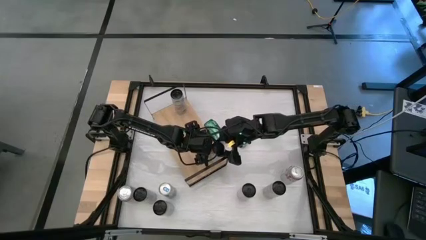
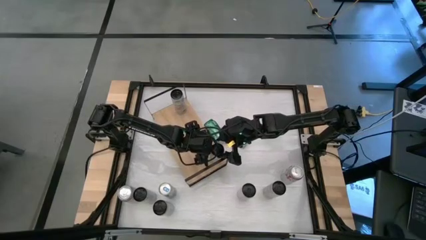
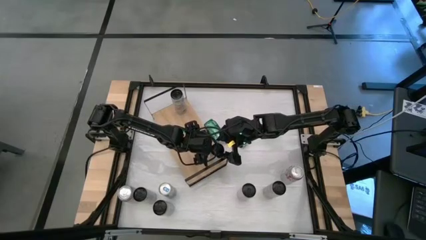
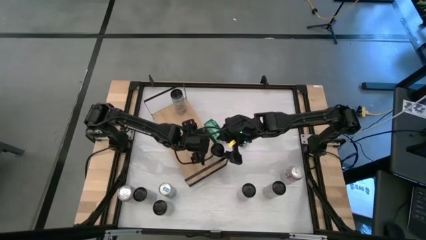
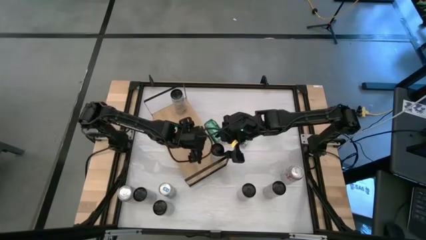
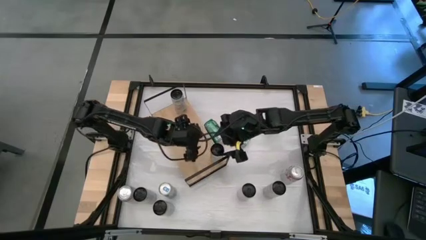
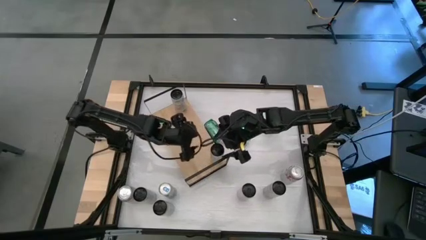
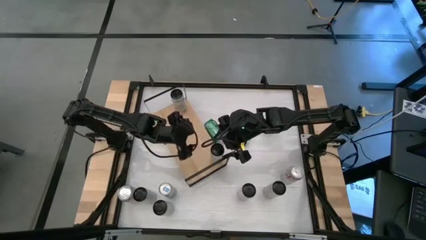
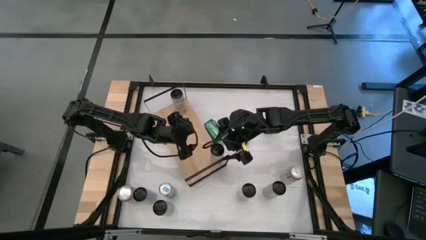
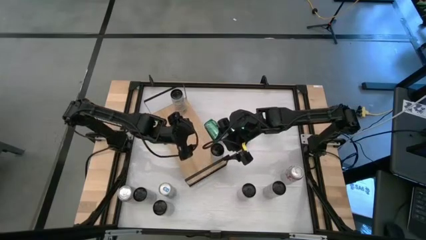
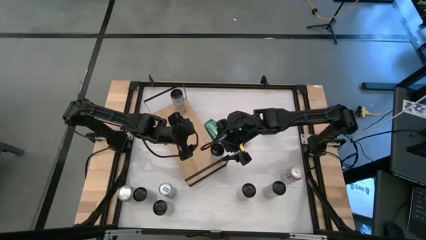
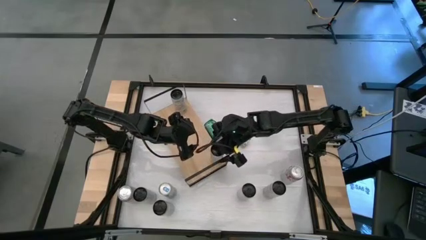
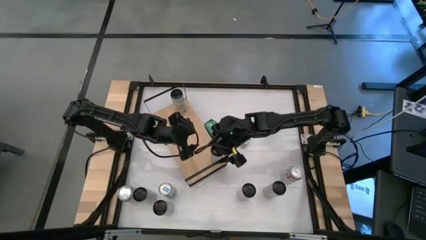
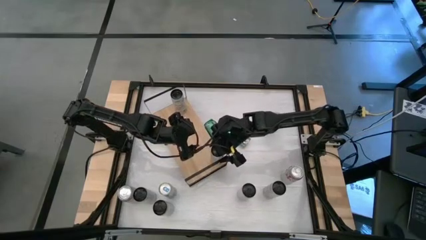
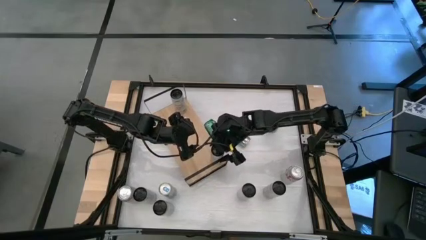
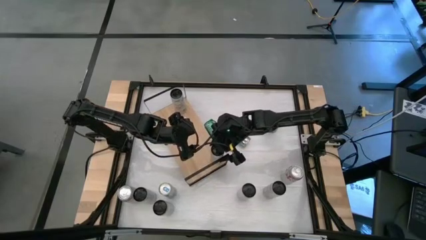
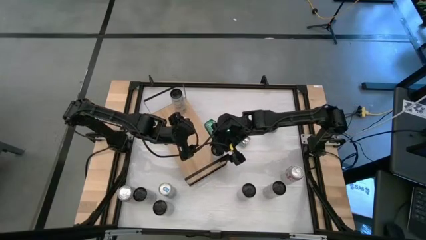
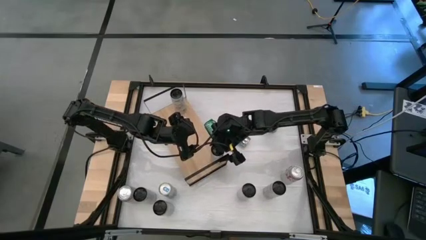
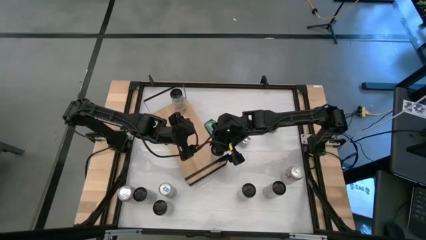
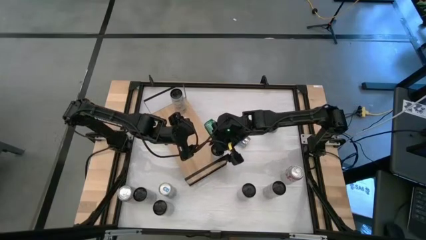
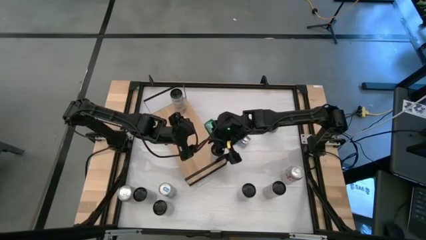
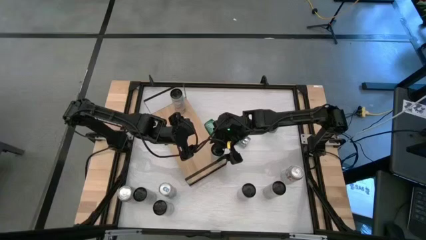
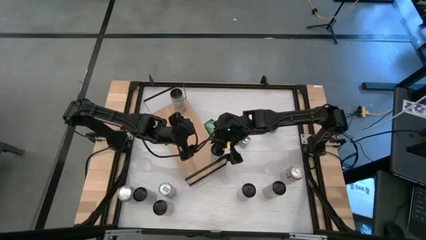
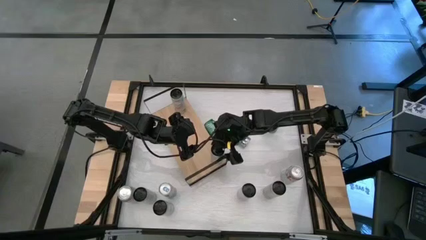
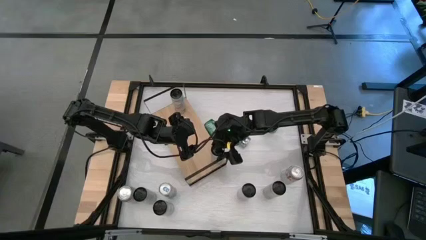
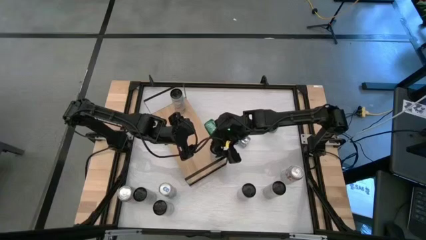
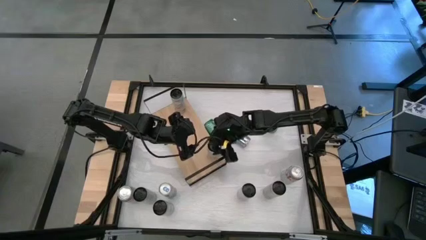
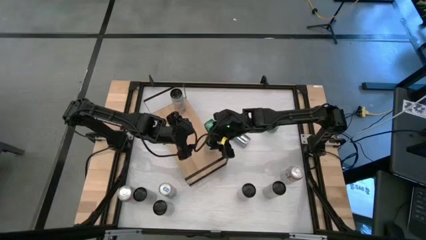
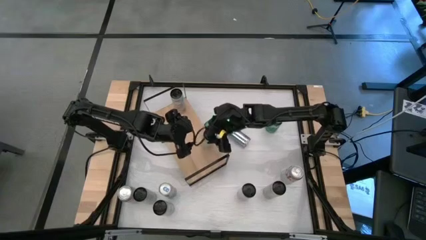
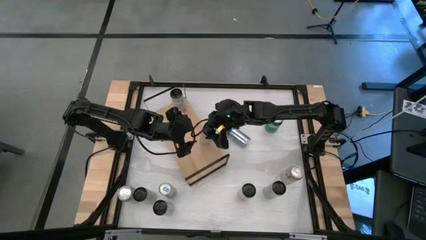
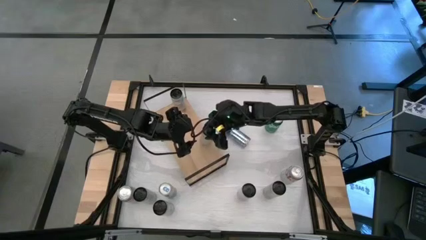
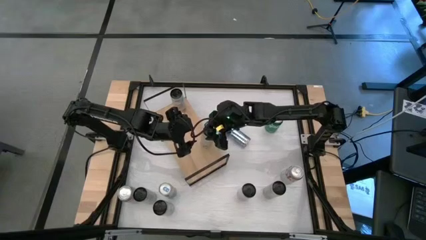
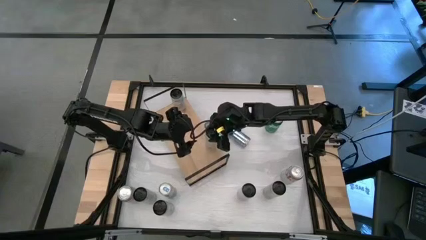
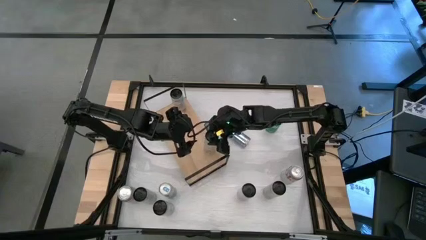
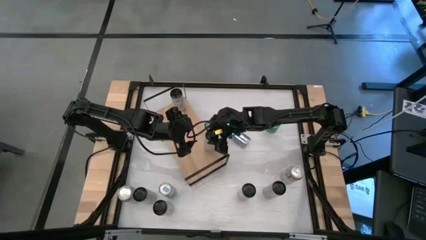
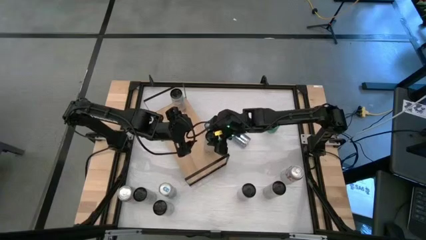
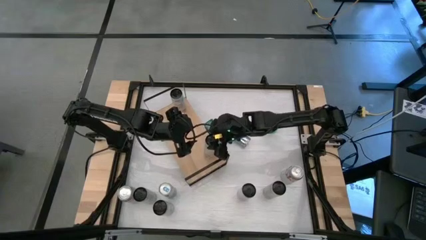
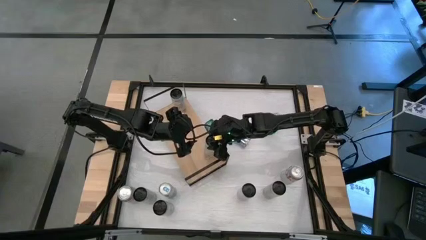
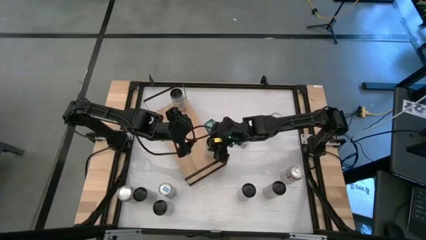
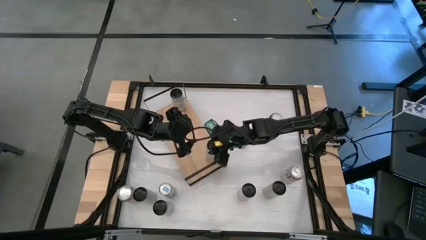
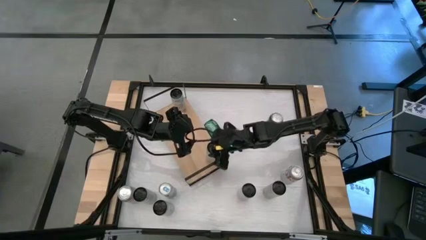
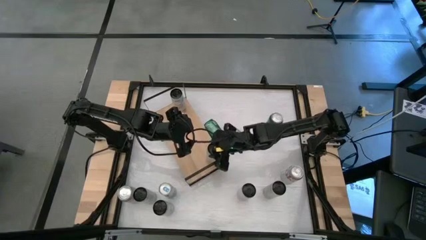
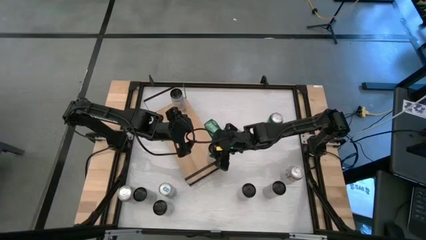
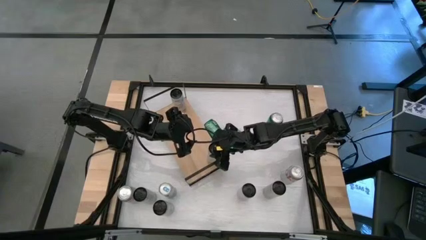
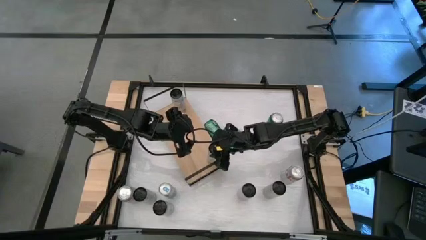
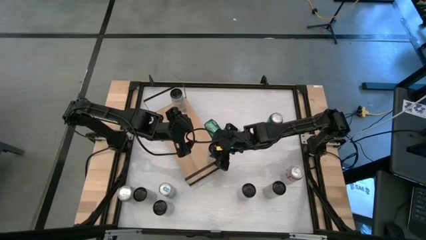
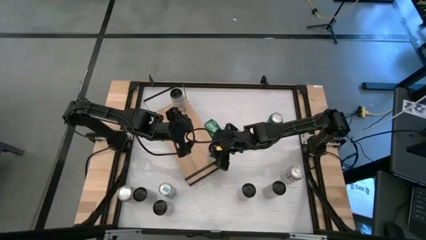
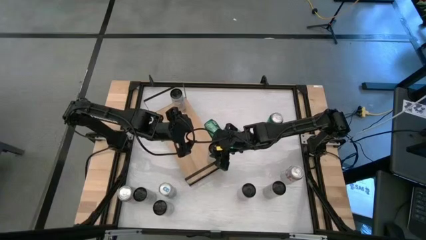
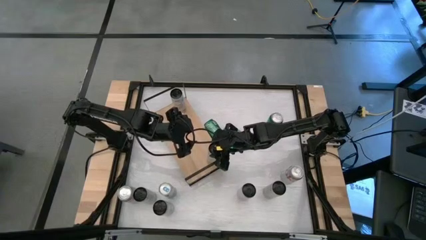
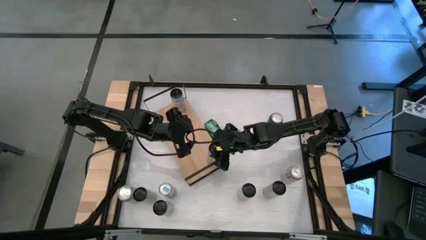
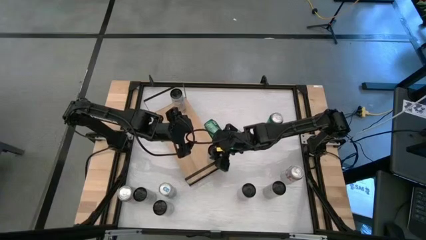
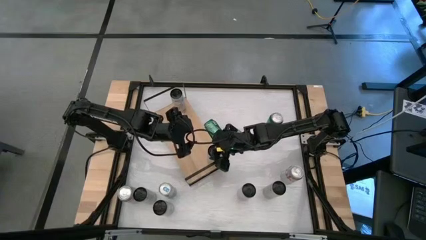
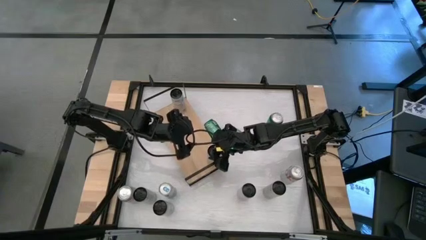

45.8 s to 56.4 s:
Task: Place canned beverage on shelf
Put the white yellow soda can on the shelf
